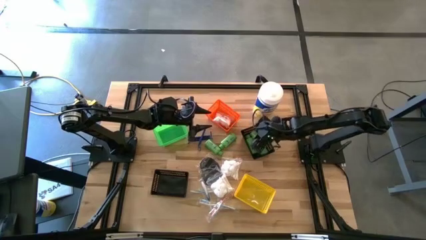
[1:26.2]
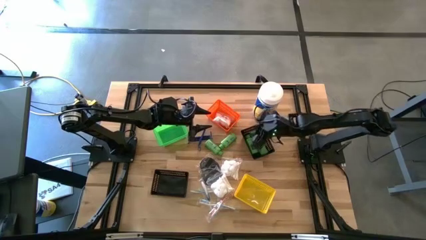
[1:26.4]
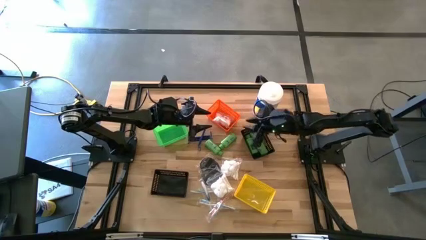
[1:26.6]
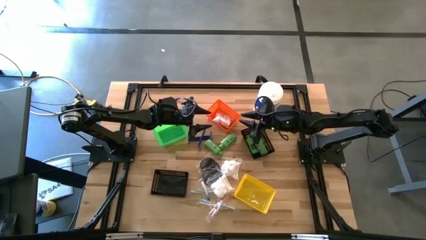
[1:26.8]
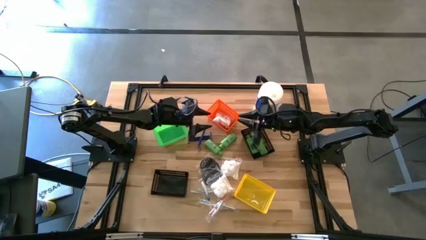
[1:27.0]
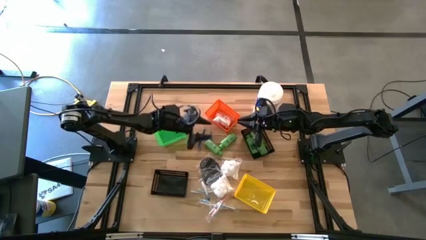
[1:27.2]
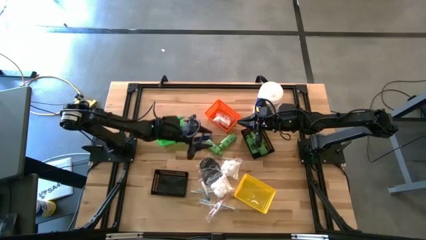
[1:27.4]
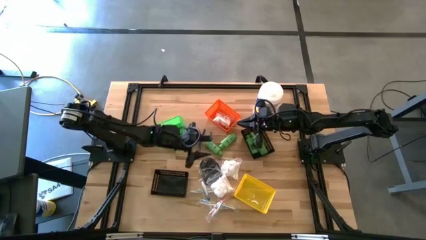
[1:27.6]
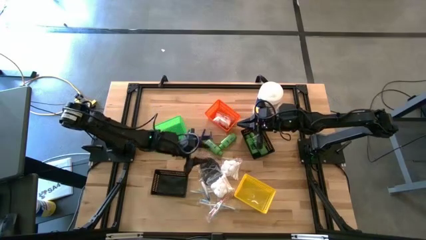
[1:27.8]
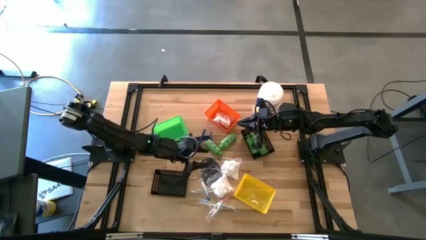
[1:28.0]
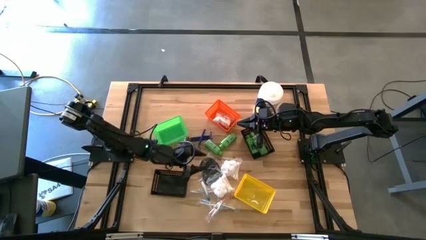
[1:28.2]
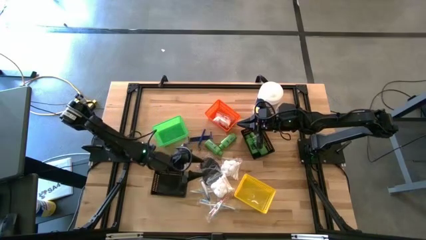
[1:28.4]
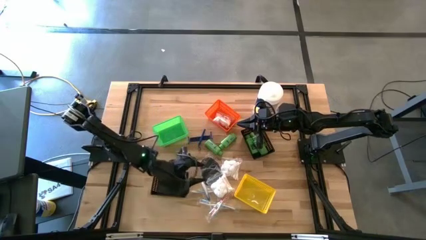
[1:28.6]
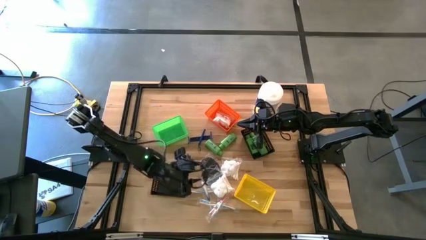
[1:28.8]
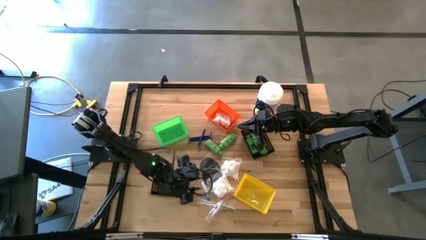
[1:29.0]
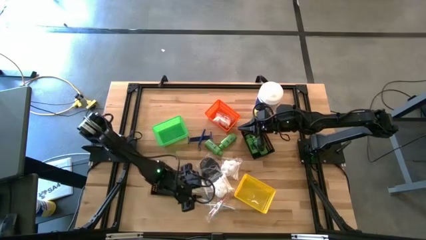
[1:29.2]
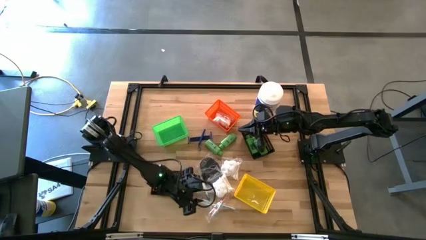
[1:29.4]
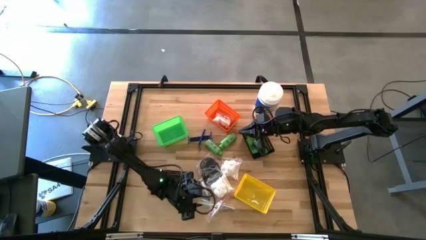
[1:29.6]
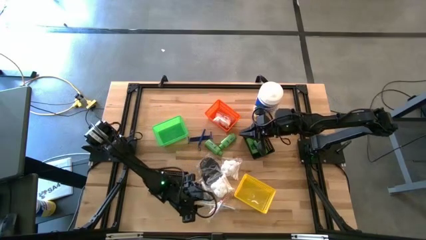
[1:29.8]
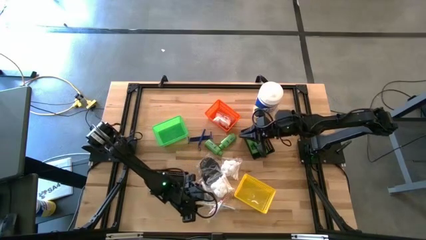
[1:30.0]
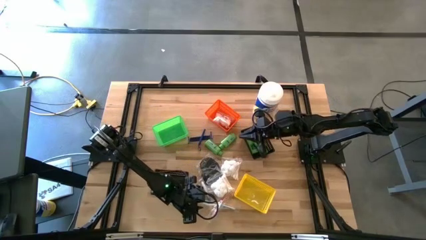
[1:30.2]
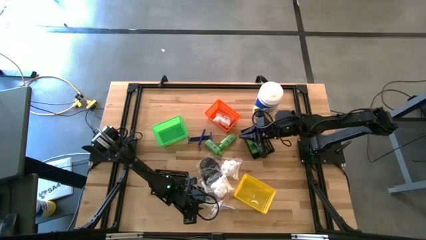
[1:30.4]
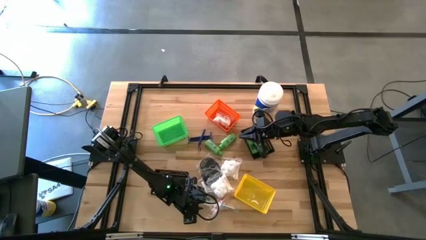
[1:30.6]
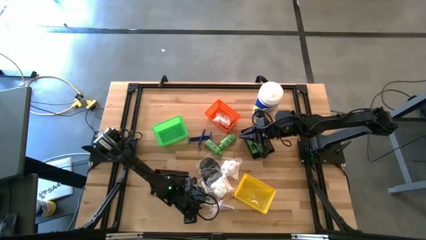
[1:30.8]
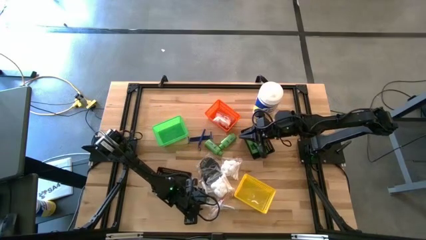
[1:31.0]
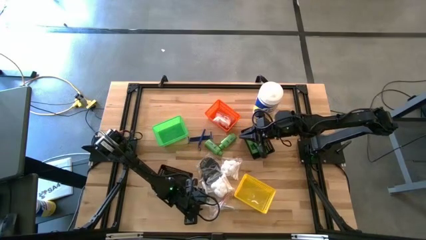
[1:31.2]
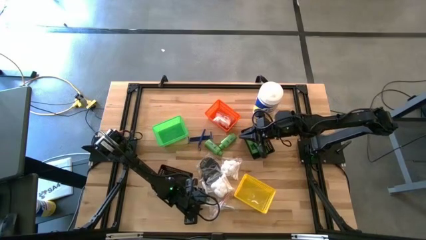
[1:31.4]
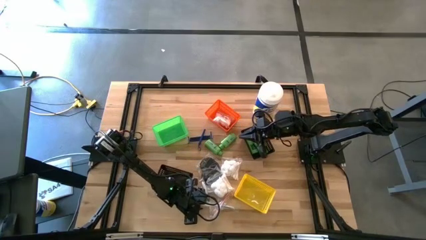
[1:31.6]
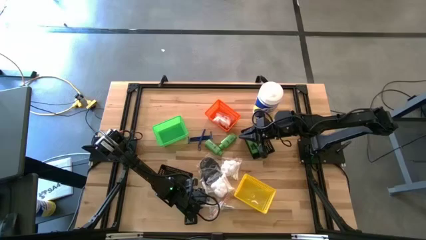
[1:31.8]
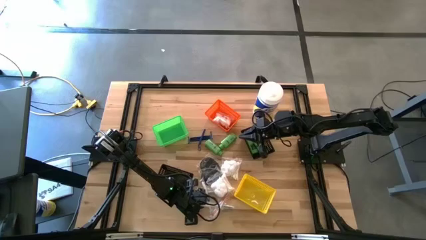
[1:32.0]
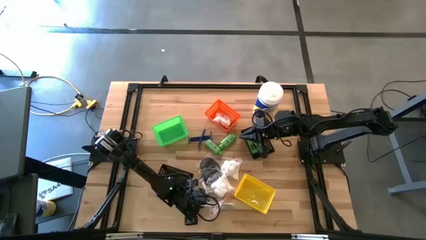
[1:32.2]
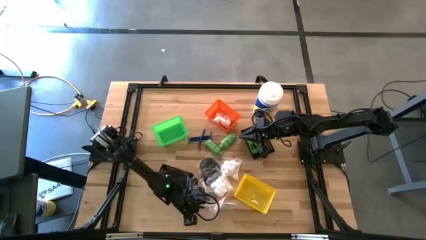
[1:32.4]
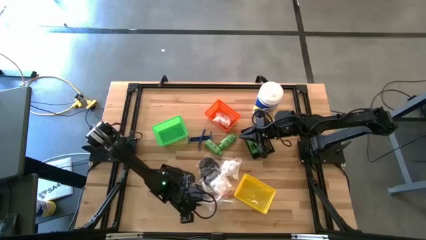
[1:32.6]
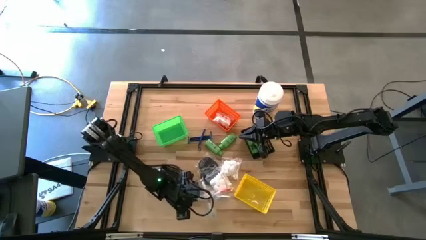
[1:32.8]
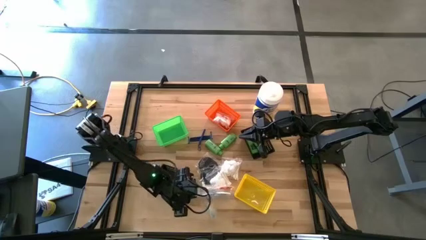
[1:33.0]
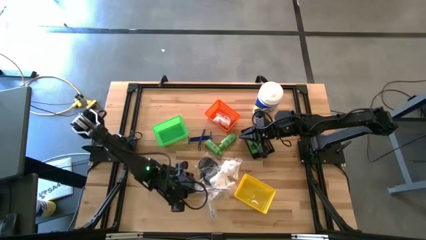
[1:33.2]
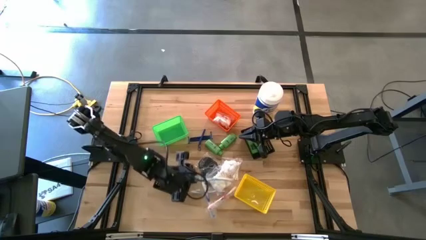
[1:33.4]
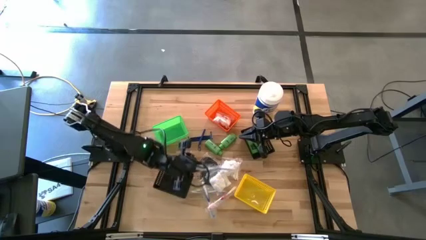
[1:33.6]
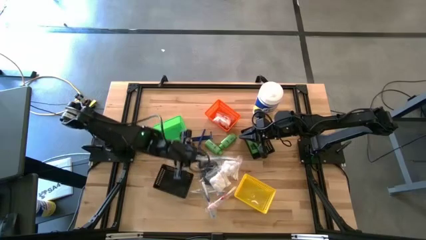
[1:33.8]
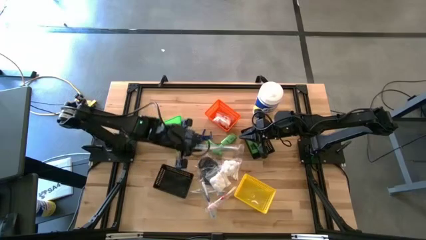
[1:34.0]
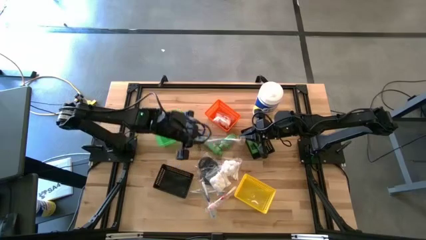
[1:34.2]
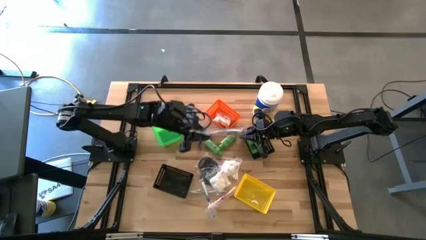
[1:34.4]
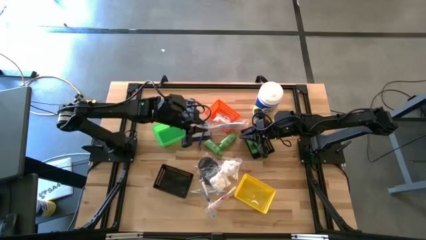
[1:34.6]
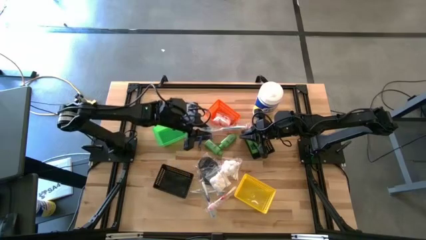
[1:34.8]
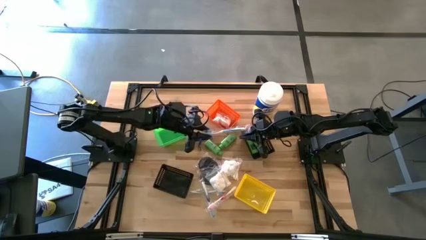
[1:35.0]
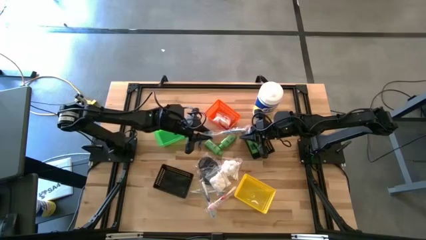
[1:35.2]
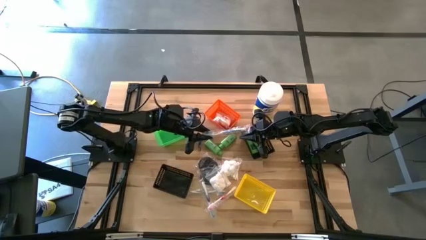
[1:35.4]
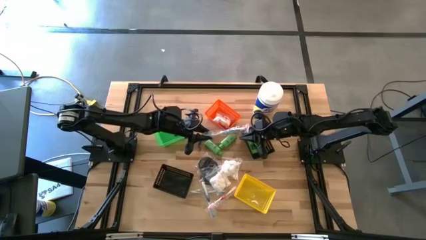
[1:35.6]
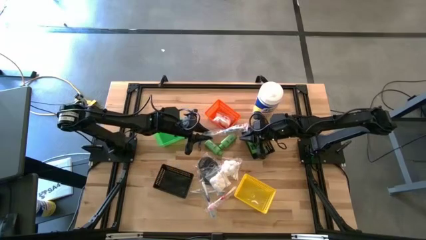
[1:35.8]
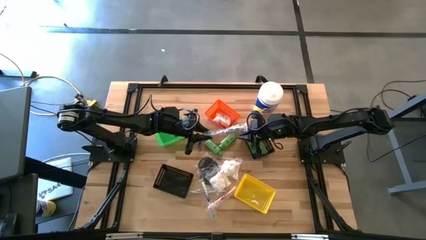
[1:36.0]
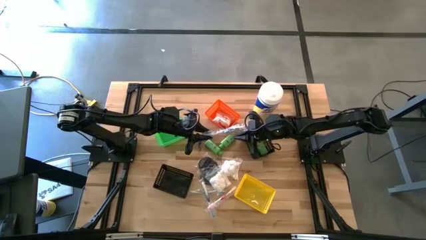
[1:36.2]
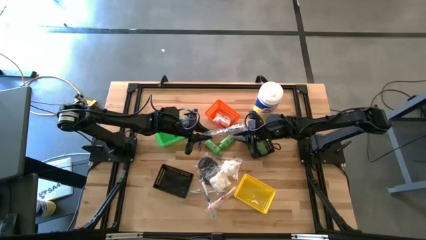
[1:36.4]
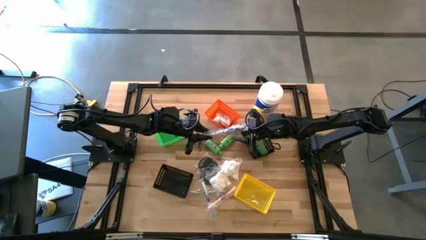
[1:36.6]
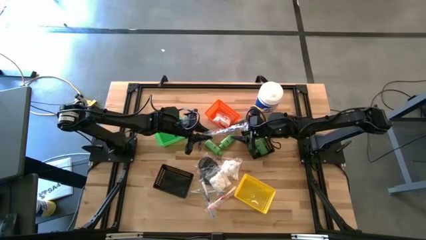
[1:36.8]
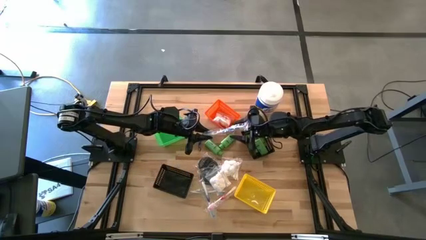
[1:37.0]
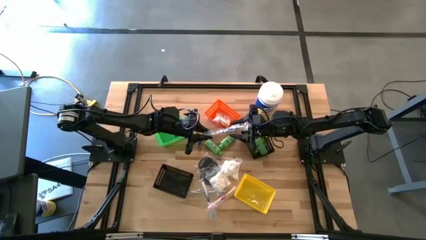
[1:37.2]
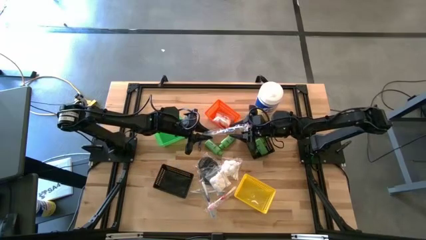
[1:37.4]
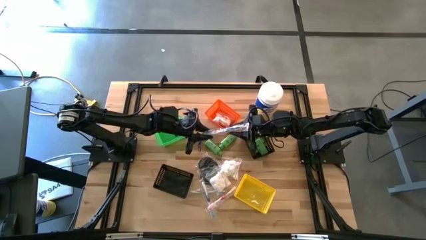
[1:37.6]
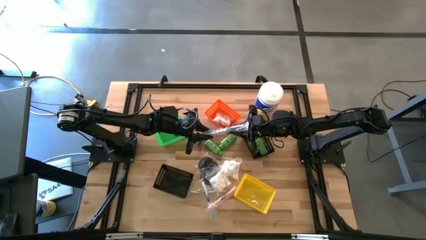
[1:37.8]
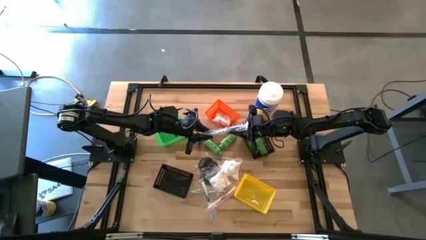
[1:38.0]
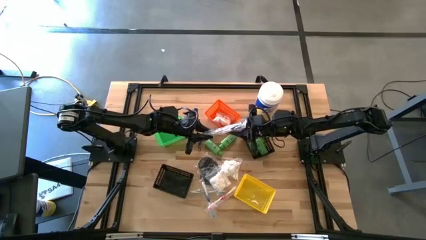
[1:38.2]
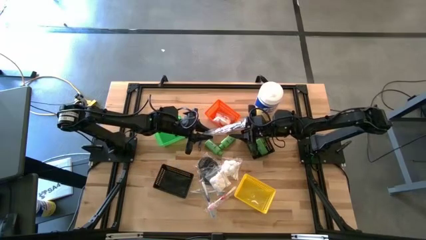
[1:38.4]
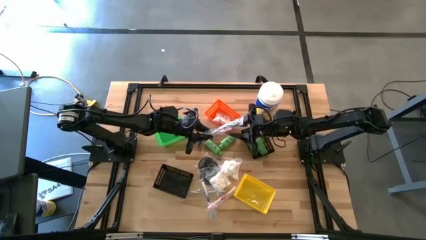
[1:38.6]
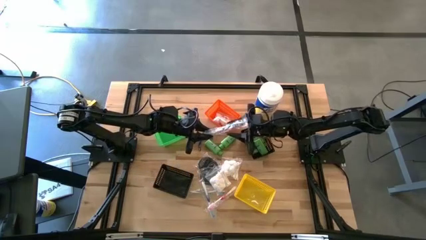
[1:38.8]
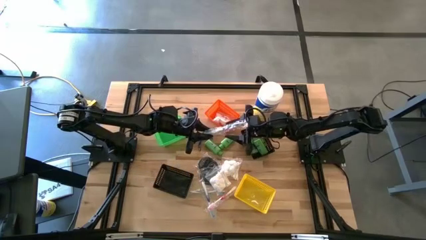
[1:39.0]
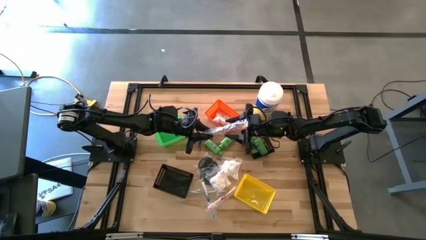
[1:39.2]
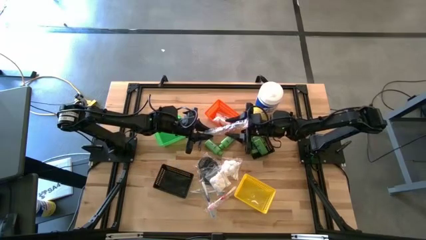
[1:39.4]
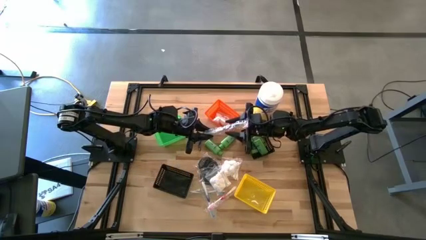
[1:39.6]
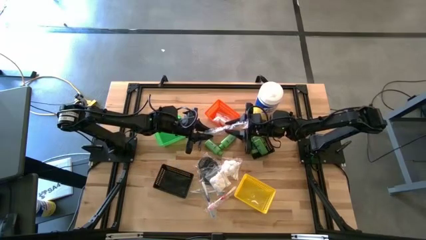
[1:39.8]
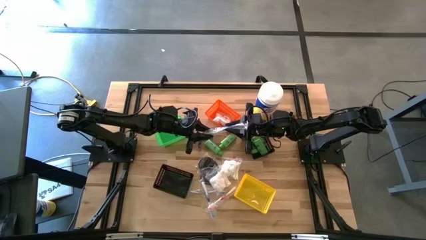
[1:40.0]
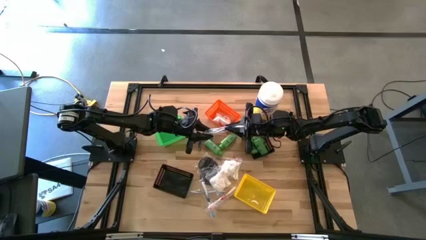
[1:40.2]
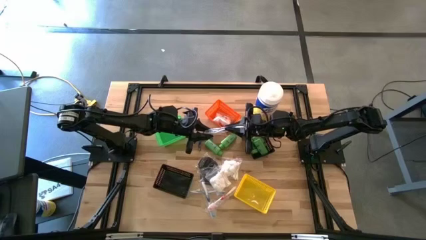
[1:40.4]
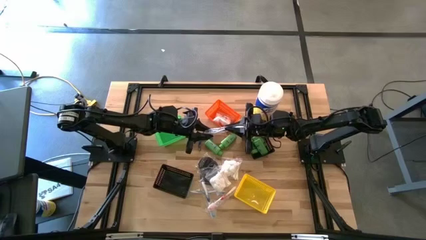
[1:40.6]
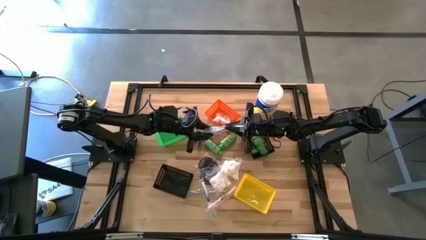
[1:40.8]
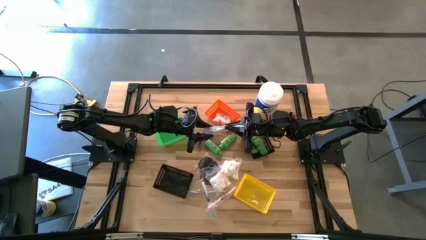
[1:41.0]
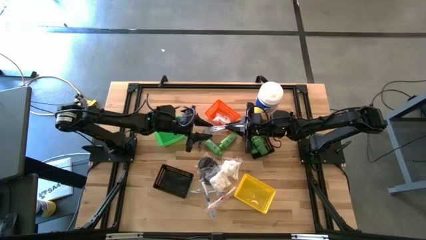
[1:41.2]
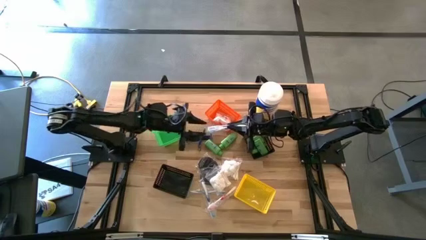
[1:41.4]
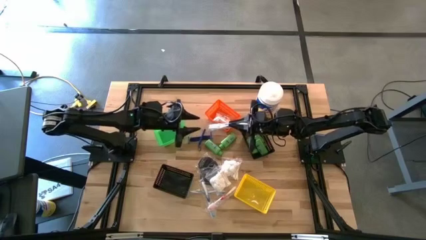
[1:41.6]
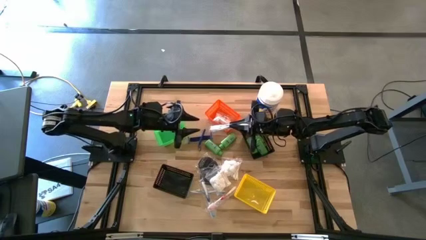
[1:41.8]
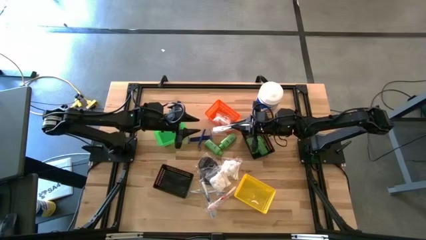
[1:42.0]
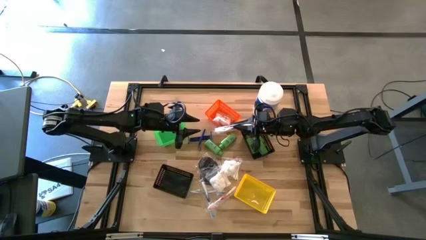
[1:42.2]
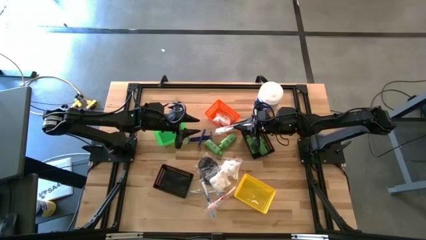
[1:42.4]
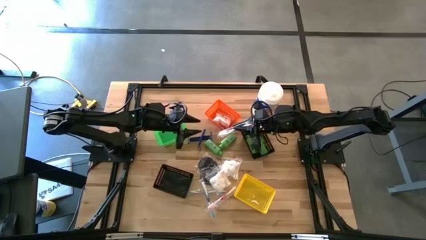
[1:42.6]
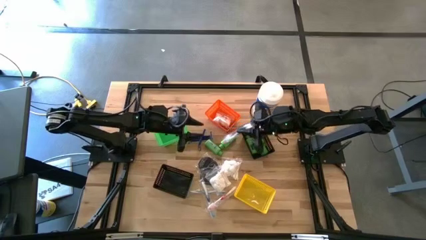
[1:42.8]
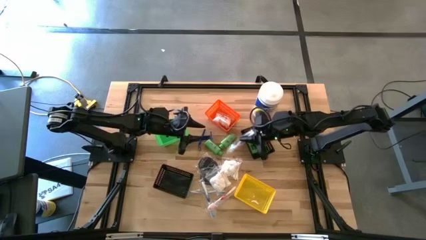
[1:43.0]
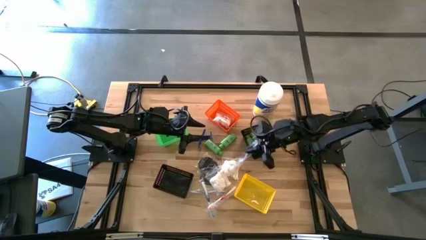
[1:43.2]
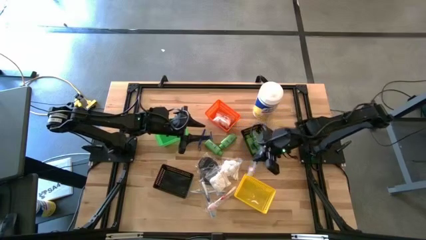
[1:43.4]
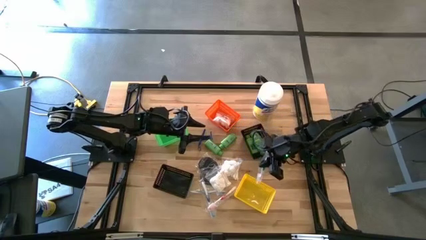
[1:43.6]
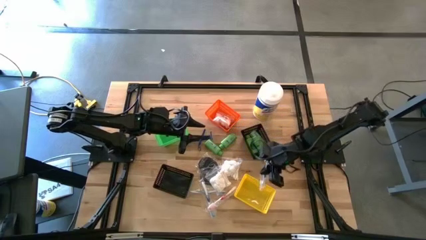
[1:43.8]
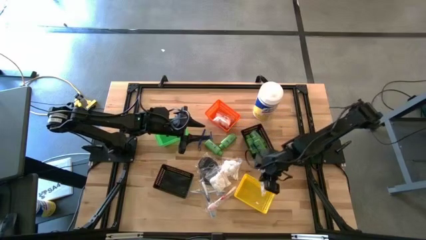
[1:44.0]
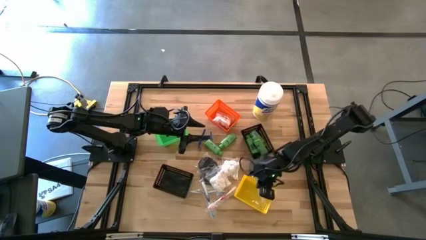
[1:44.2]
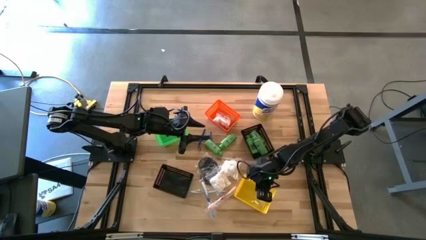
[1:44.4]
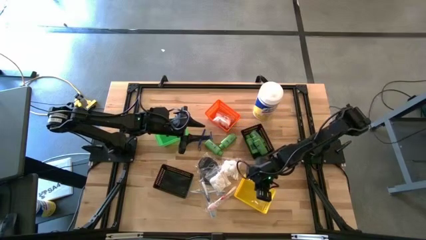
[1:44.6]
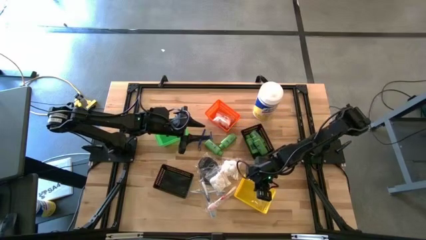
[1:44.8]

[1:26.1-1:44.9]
Task: Pick & Place Travel size toiletries
Put the blue toothbrush into the yellow bin
